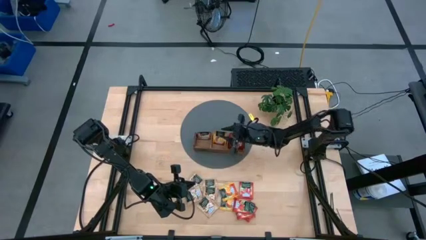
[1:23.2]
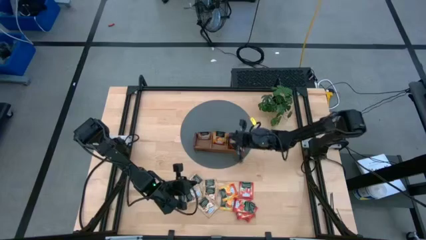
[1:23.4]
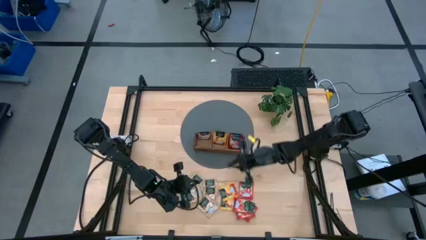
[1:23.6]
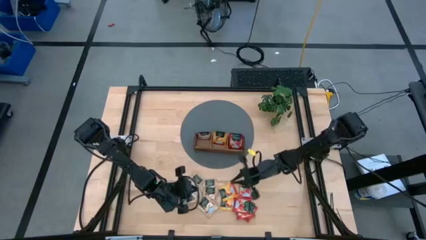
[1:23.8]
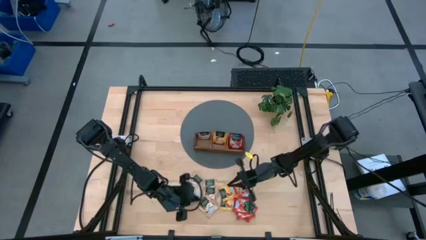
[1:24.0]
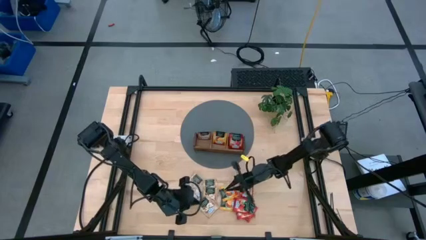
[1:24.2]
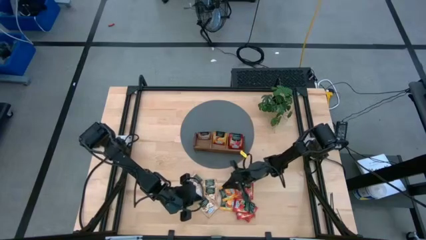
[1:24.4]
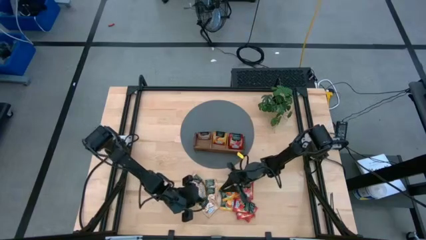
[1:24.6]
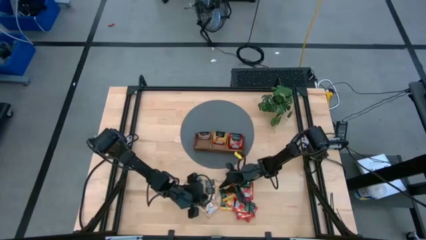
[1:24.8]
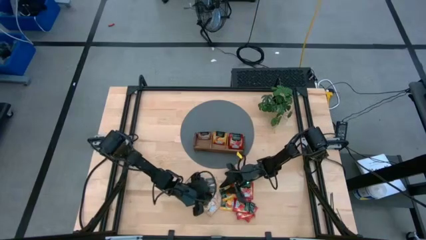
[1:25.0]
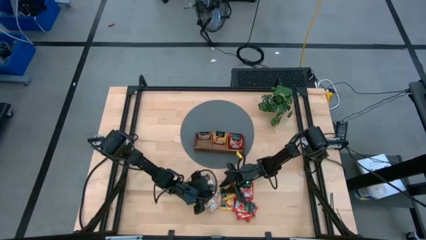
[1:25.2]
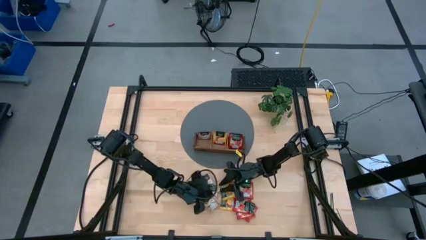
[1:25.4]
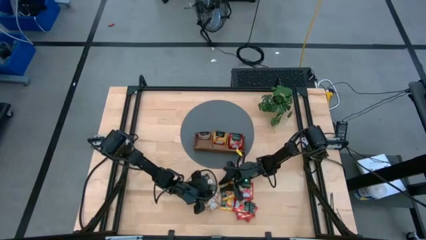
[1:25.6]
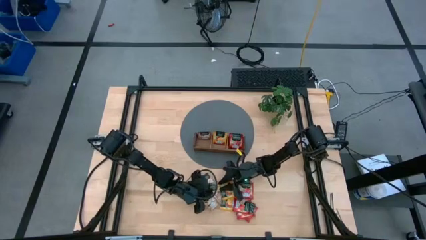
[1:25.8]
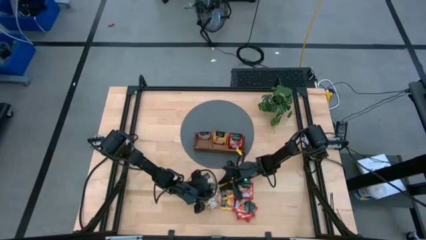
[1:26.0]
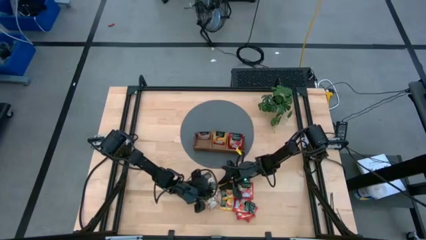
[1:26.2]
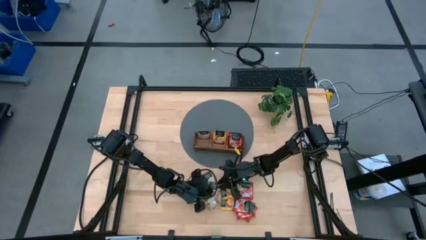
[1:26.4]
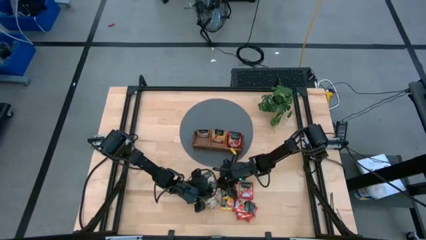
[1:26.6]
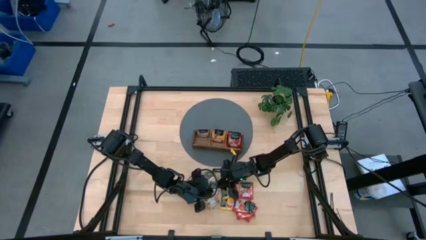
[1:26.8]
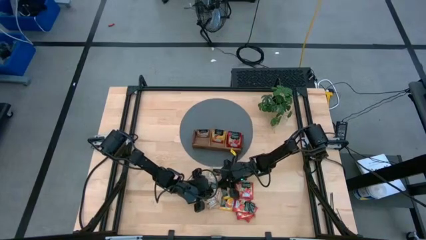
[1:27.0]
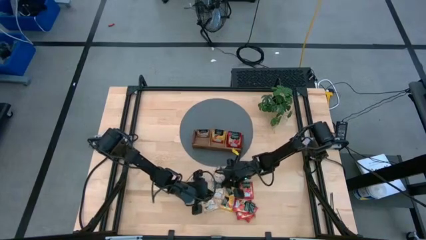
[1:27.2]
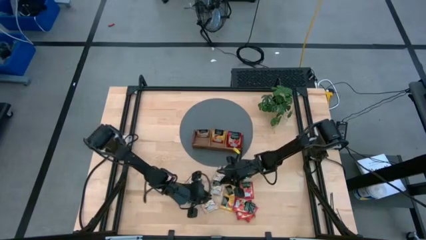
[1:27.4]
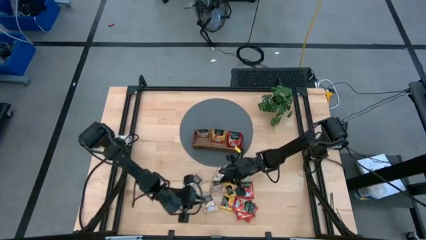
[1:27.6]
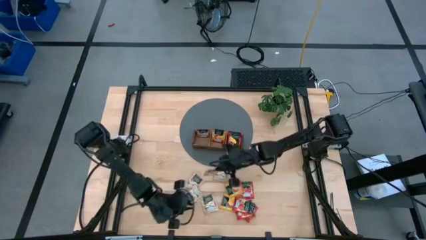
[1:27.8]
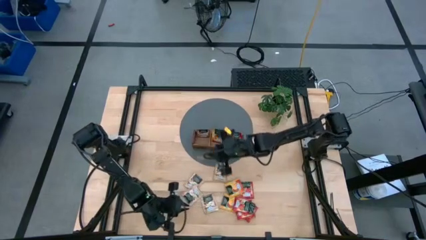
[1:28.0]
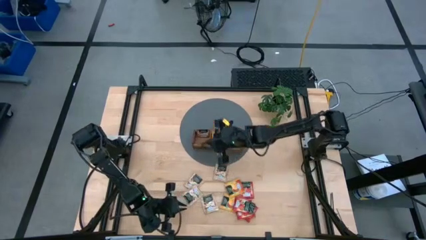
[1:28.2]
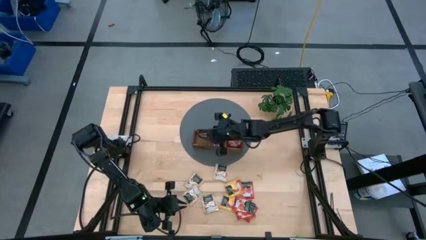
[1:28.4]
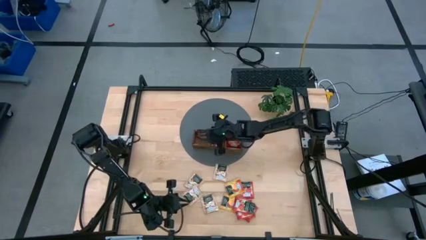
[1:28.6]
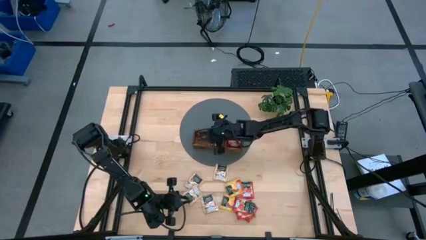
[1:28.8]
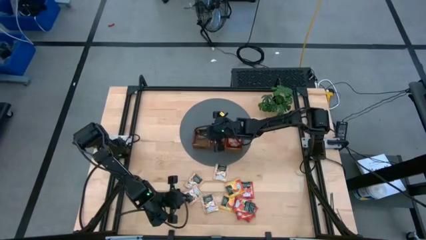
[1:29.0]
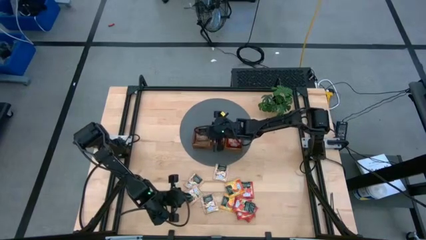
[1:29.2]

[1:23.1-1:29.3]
Task: Pick & Place Tea
Put the brown tea bag into the left section of the wooden organizer

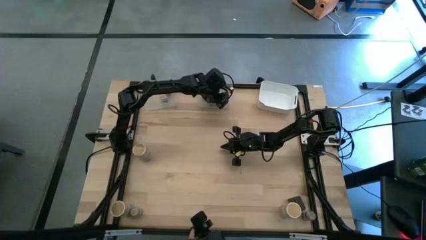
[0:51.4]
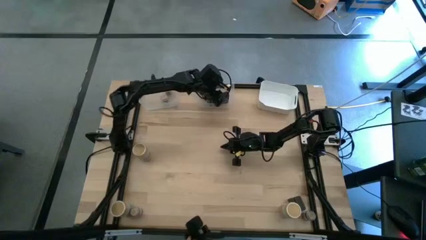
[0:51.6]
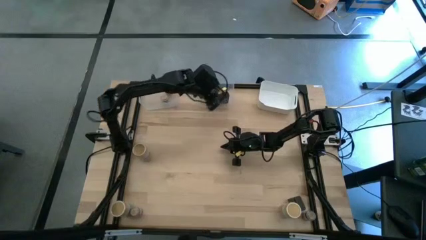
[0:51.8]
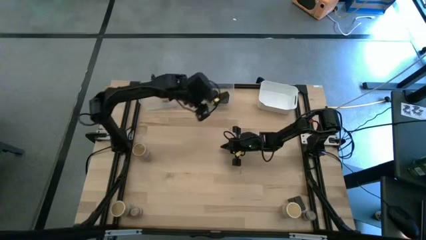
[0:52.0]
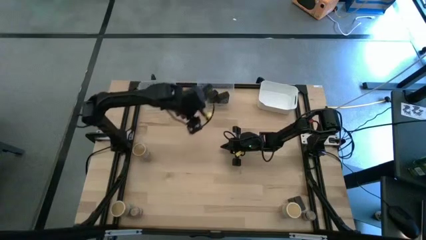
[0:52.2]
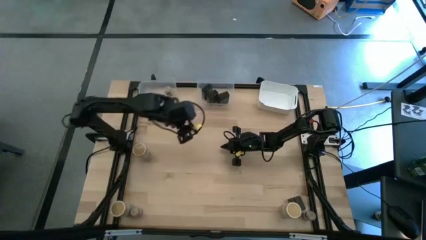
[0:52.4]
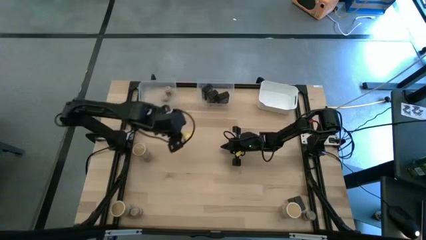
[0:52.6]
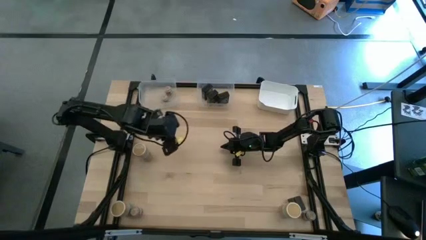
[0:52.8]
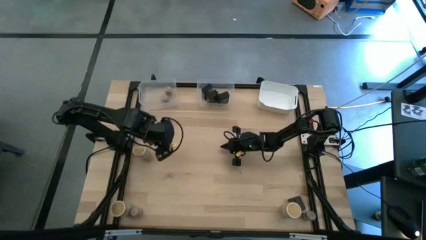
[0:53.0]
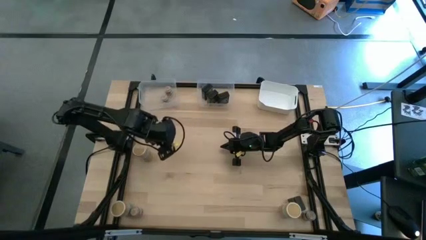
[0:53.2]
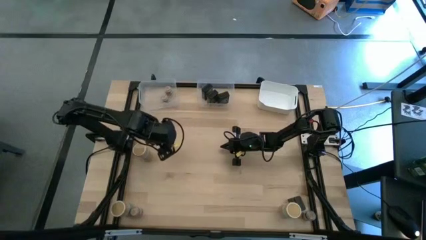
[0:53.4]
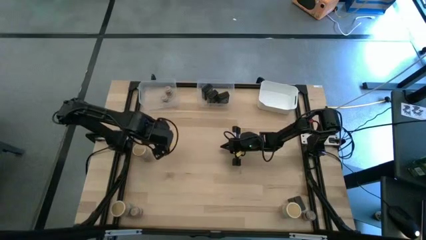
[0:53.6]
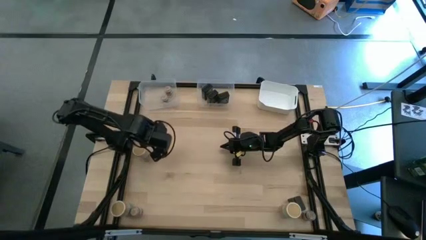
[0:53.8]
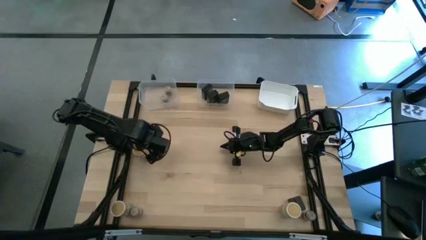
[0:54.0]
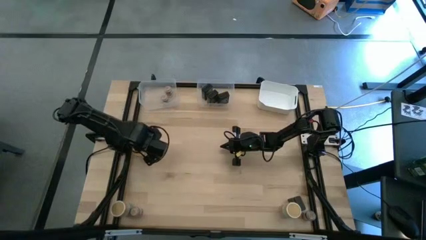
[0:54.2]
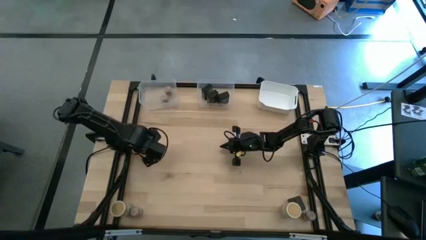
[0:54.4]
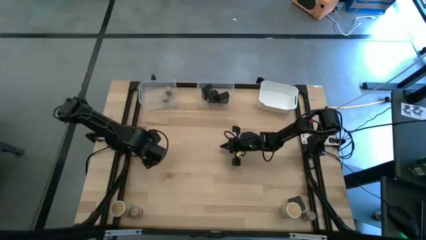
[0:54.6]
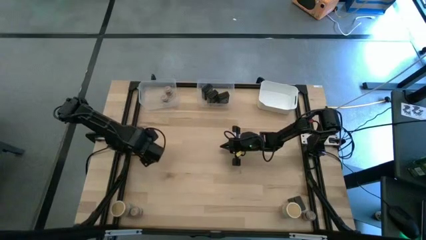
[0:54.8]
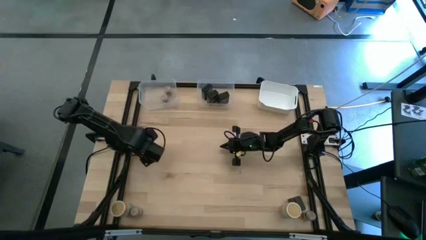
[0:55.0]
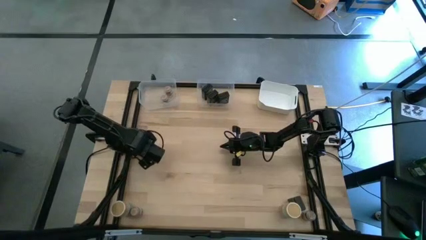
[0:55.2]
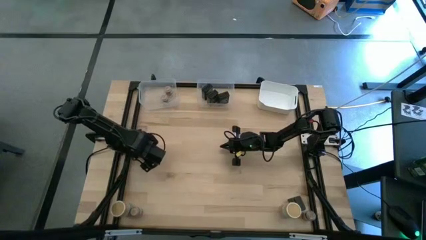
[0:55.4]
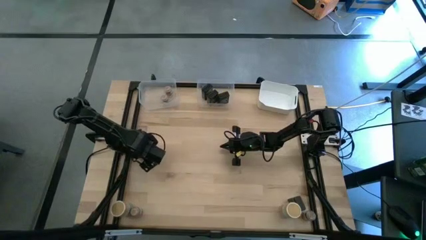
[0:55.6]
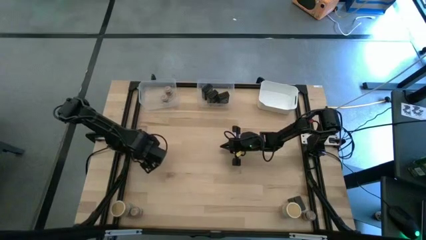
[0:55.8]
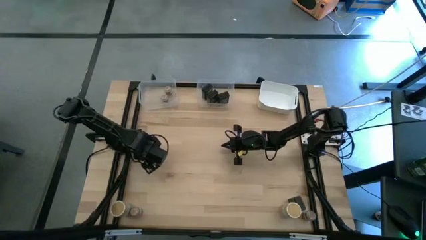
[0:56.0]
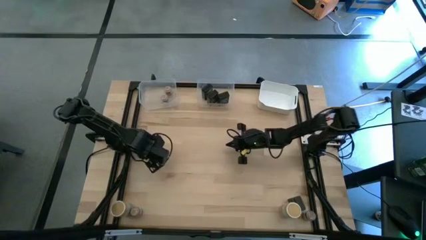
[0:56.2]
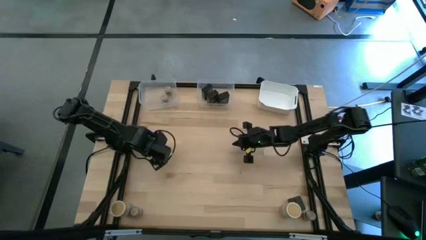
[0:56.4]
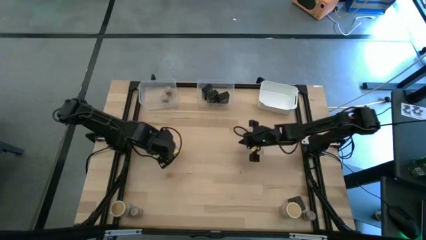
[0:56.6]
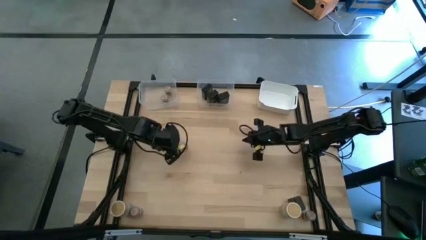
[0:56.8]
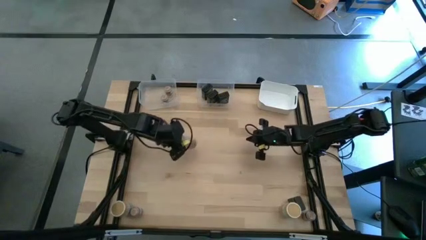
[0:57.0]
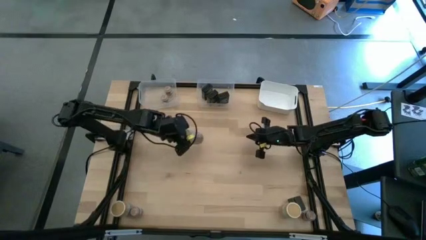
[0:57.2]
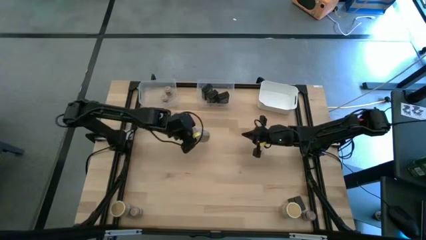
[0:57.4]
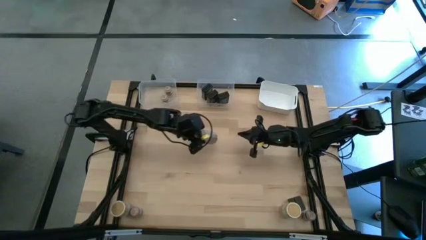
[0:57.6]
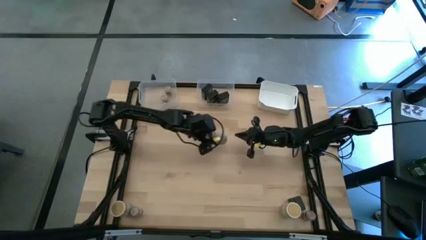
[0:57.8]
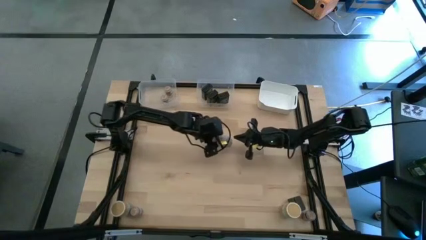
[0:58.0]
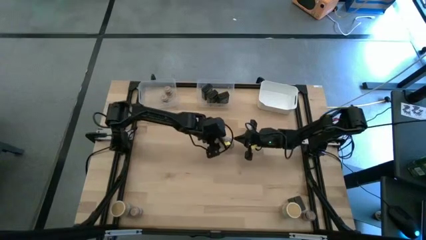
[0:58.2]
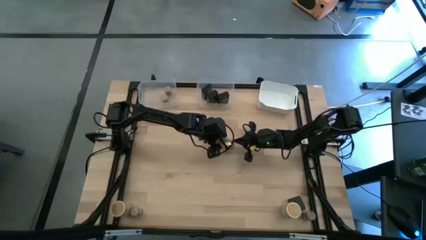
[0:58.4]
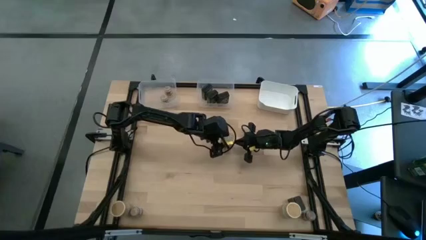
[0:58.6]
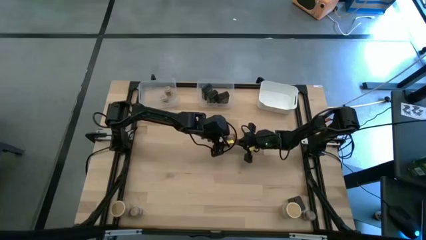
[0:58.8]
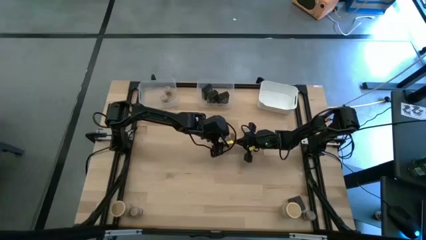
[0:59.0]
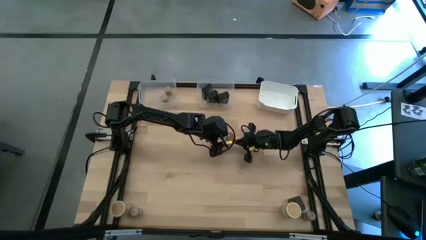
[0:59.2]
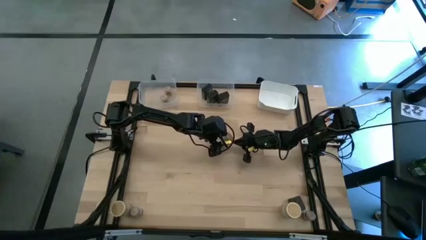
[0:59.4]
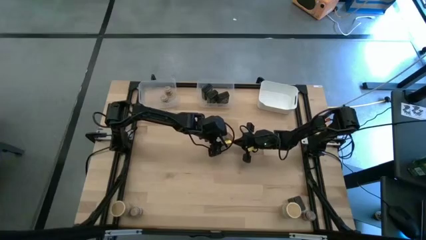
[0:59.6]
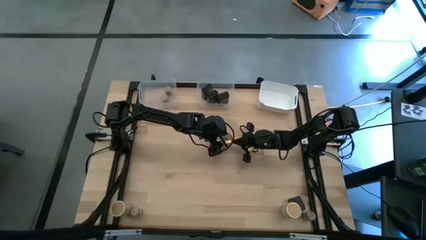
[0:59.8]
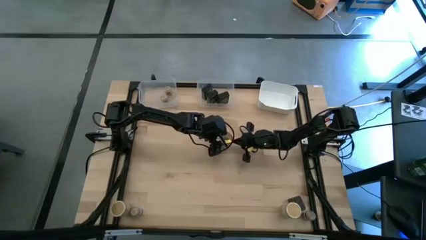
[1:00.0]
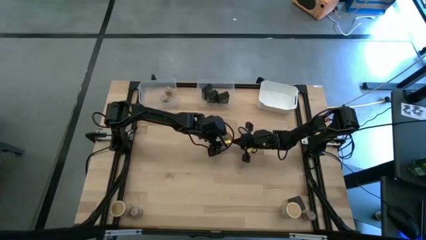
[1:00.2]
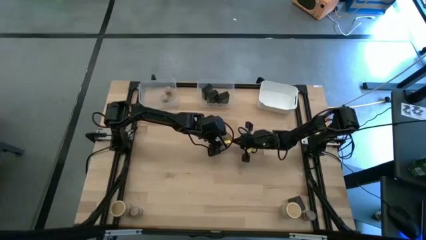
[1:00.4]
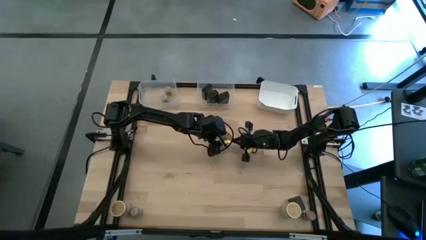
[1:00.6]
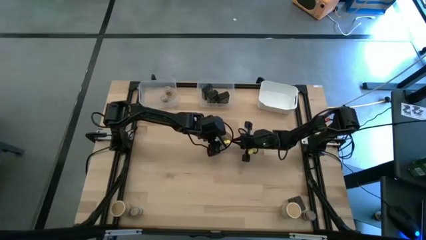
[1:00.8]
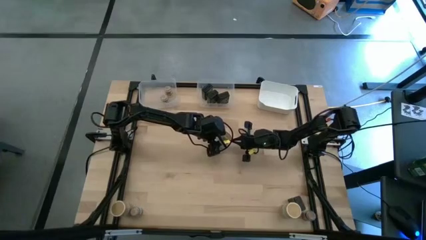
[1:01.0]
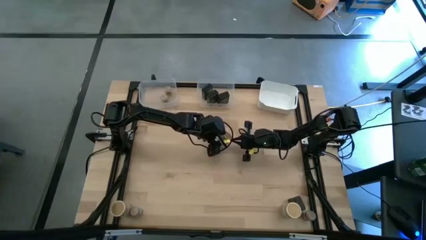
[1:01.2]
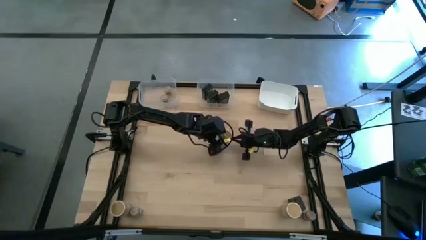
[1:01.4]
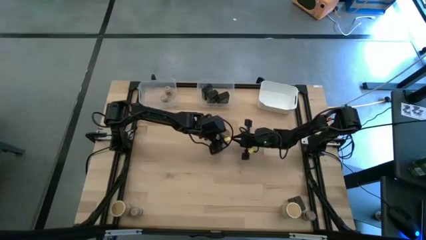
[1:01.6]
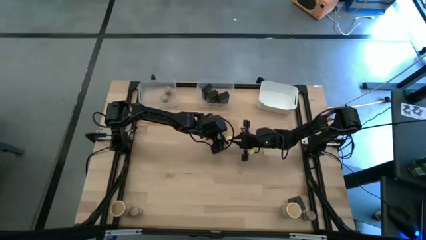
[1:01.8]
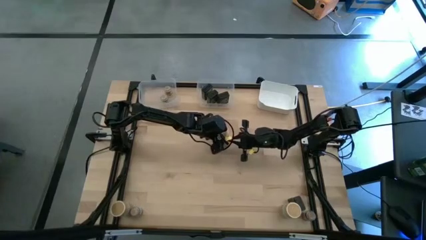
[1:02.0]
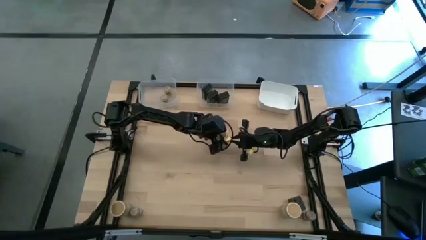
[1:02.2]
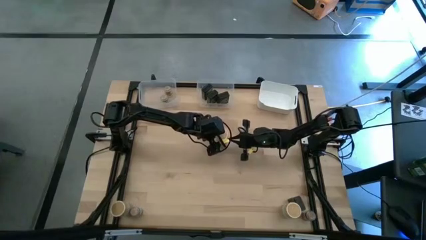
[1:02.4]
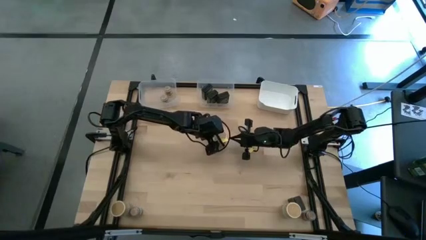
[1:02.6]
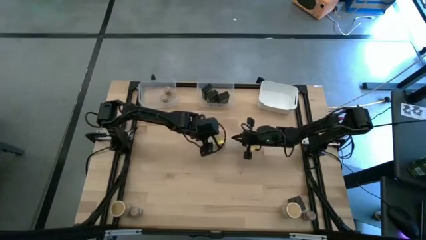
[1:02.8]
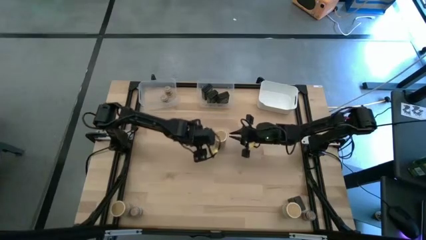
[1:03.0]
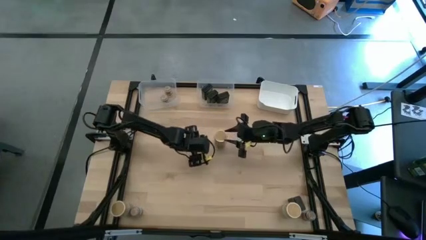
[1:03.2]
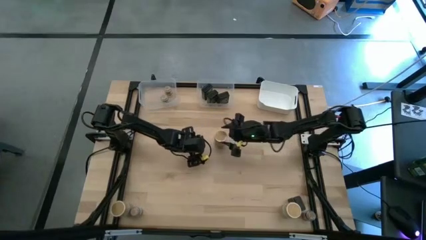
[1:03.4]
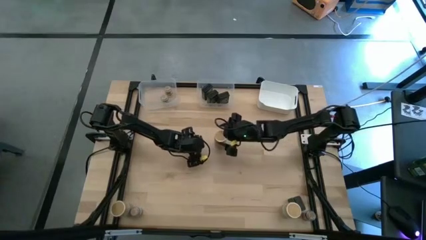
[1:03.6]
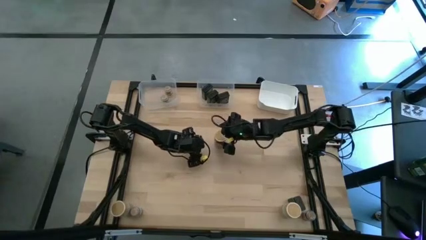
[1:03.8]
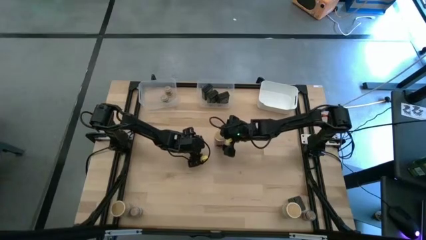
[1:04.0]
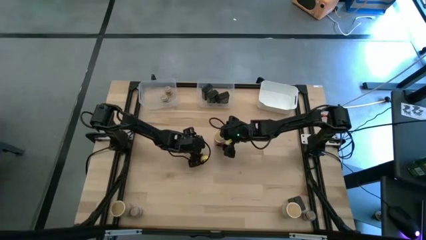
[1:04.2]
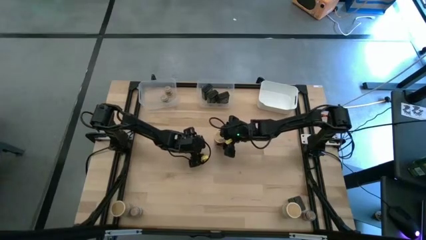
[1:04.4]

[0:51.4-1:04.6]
Task: Sort spices by type
Put the top left golden seasoning bottle into the right white bin
